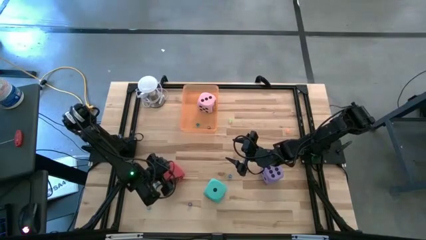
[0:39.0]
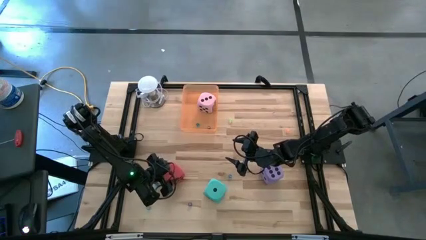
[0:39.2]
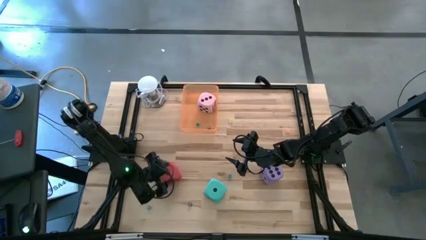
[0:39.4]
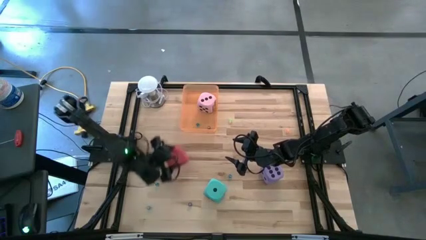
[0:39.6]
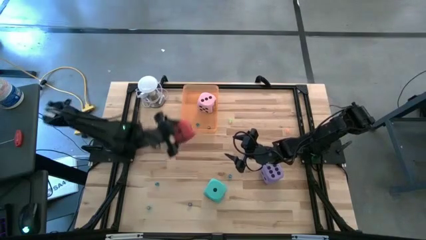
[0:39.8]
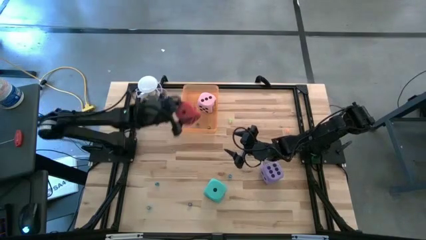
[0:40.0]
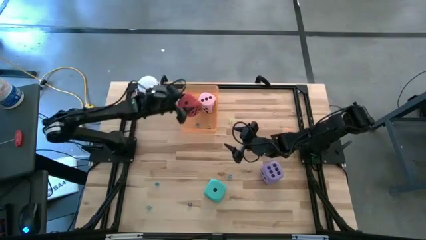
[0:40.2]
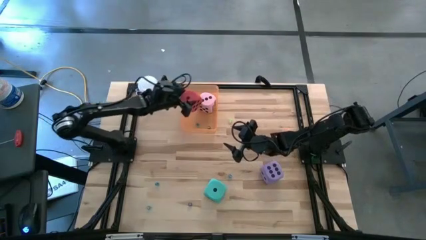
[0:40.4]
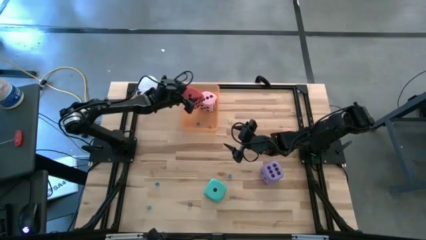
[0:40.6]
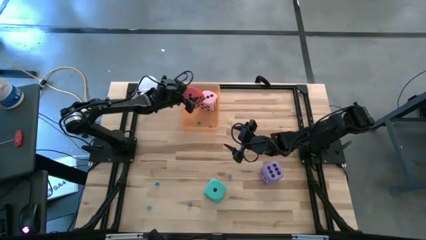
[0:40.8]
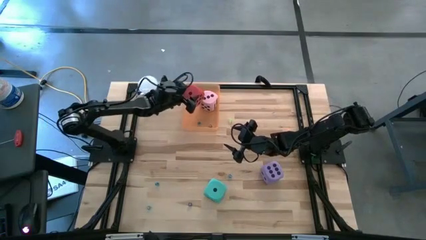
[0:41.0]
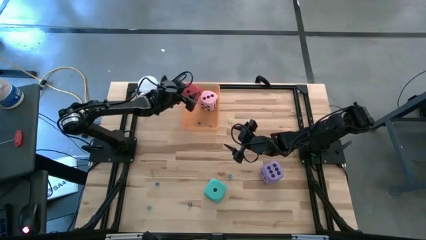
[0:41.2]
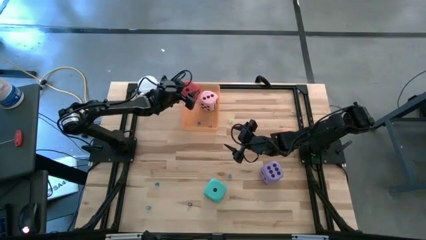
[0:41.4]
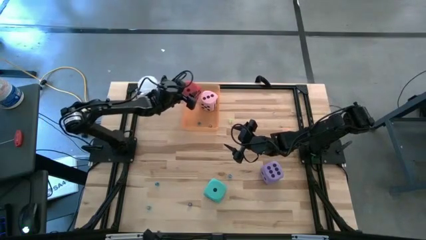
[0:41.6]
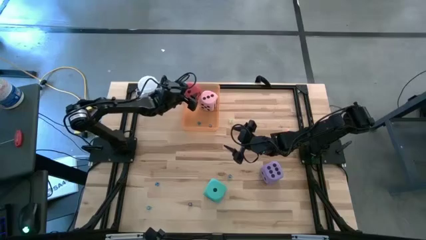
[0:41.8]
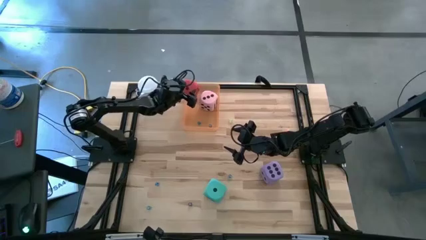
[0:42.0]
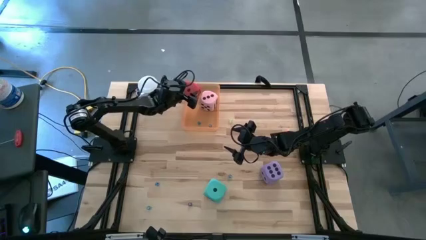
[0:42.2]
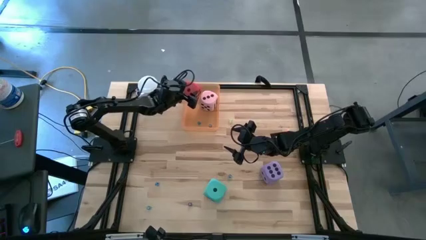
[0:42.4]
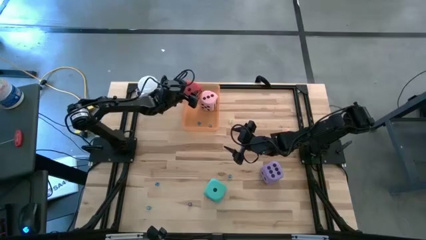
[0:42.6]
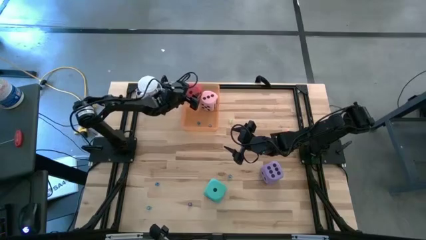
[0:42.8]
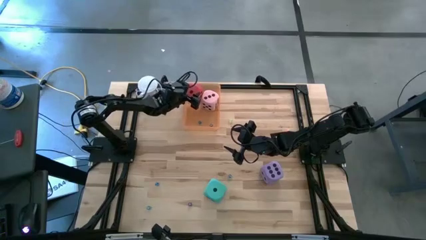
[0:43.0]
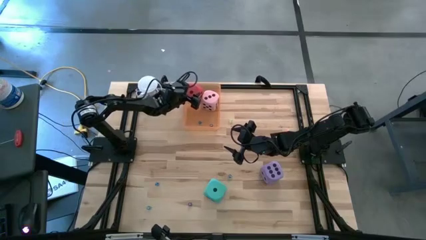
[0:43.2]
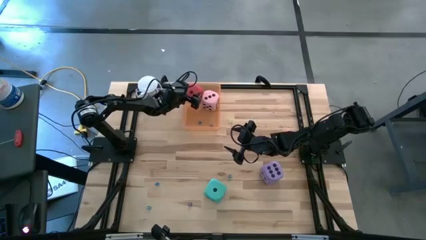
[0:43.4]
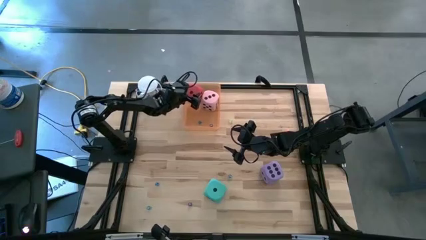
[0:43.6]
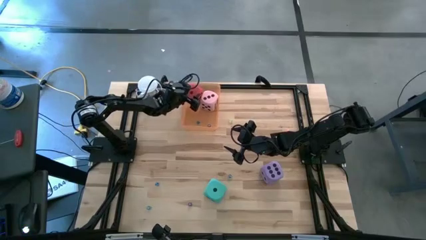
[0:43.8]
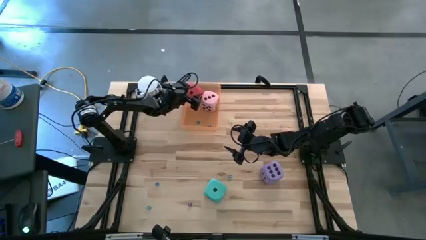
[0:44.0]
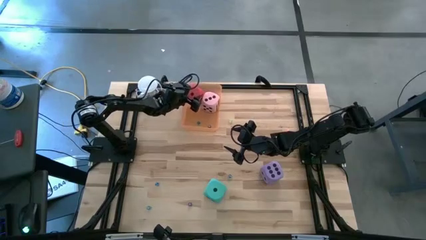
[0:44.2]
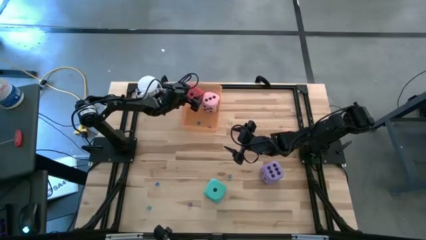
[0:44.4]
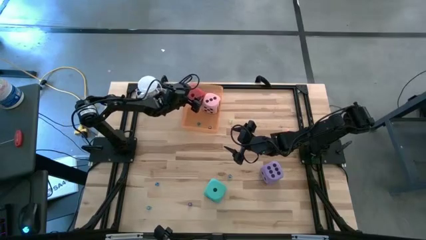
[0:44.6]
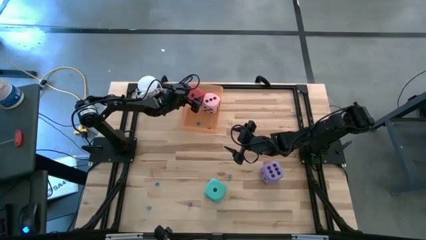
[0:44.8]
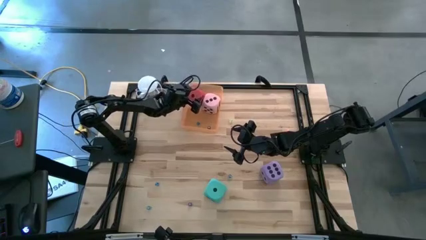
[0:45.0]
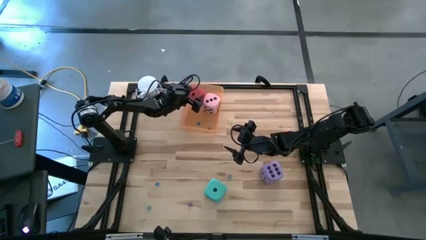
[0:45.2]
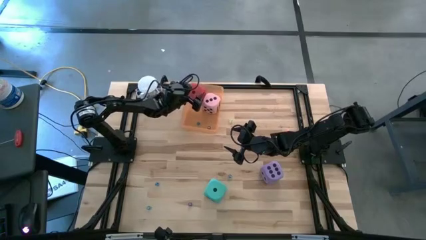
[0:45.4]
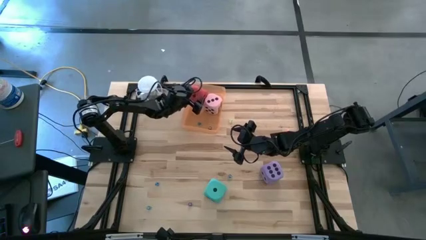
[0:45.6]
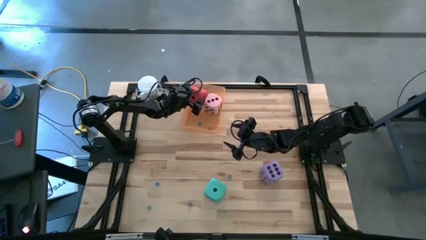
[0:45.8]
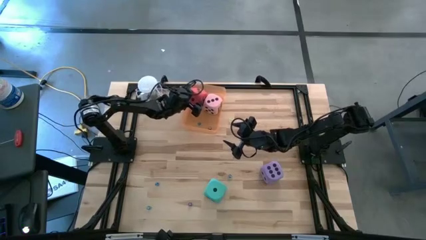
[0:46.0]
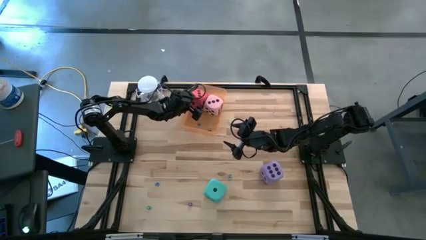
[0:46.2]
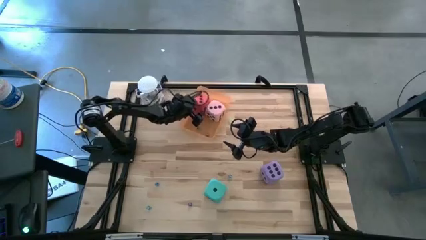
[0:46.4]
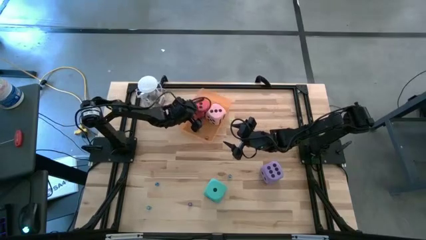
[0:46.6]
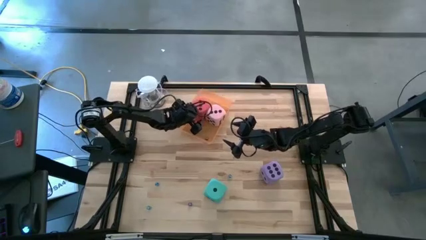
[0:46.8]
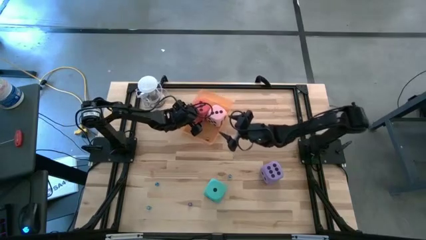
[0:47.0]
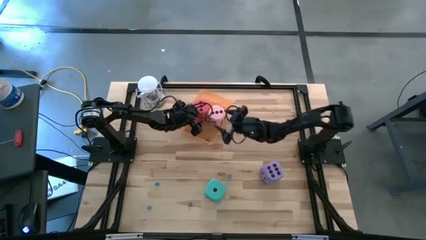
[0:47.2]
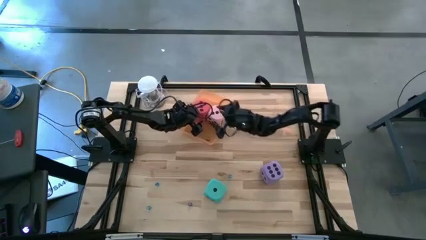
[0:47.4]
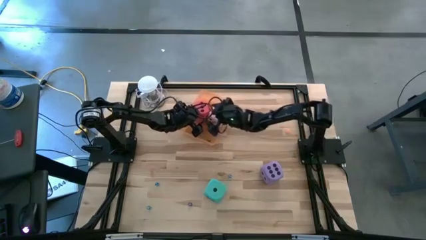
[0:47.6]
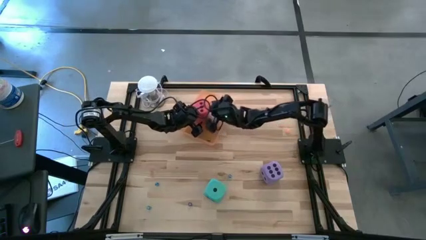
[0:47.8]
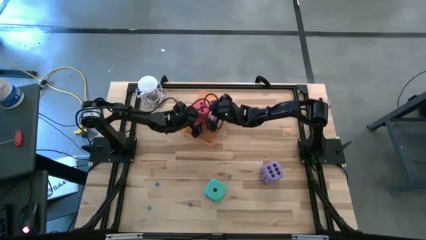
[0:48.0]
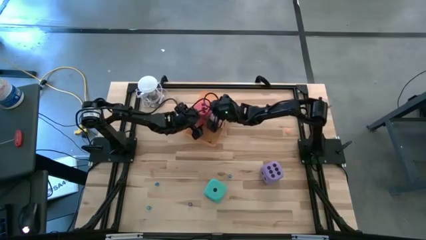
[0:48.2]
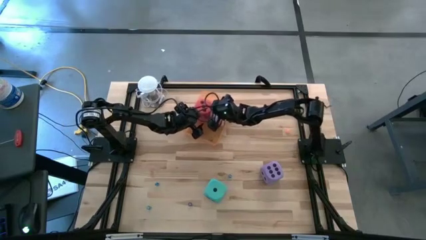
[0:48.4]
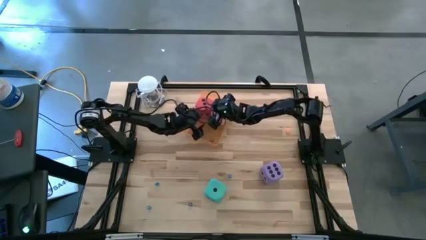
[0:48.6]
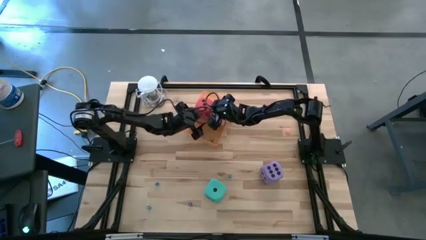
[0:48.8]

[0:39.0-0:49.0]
Task: Pick & Place Dice
Put the big red die into the orange bin

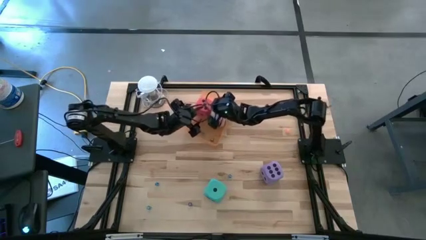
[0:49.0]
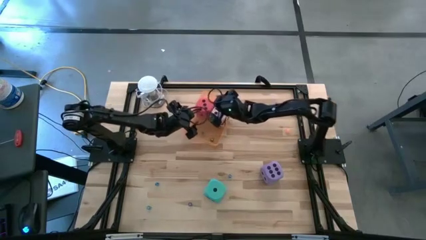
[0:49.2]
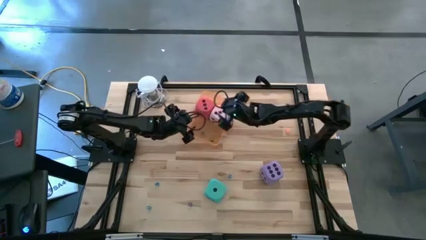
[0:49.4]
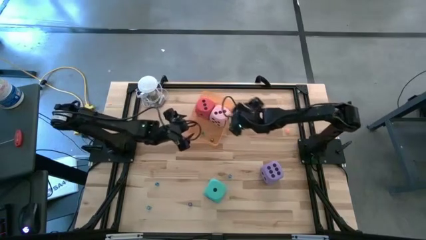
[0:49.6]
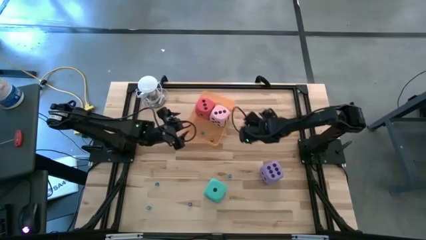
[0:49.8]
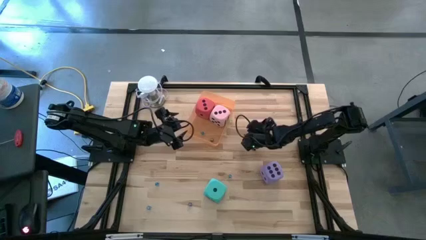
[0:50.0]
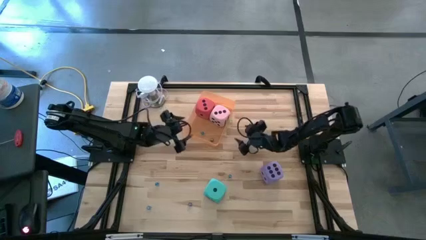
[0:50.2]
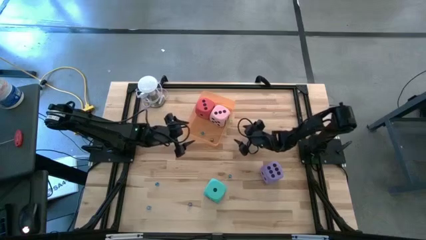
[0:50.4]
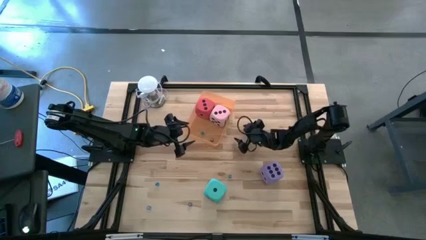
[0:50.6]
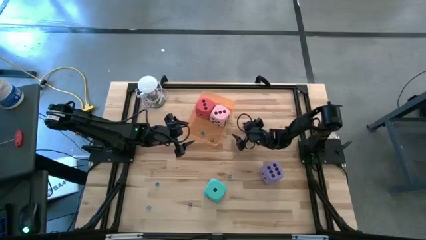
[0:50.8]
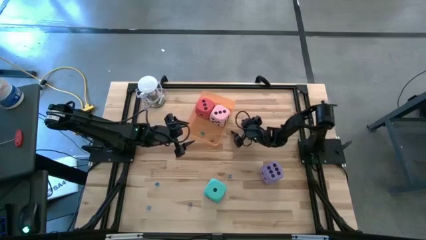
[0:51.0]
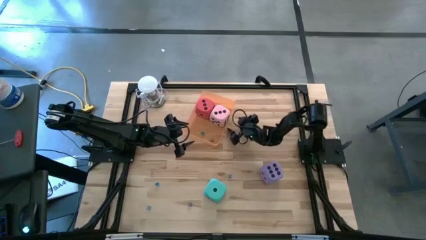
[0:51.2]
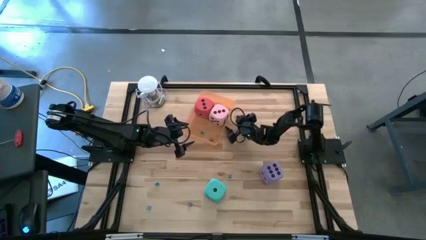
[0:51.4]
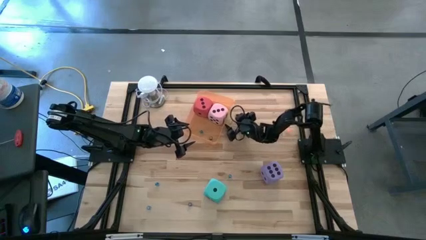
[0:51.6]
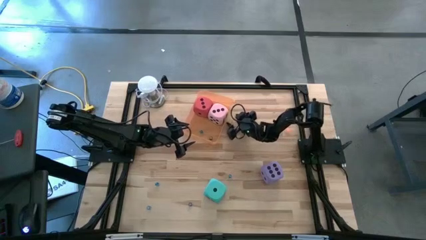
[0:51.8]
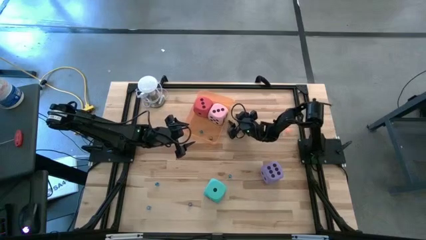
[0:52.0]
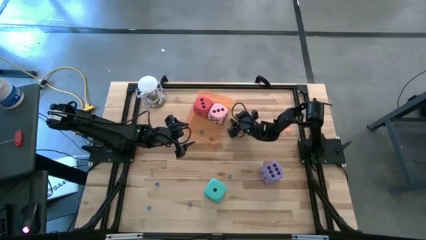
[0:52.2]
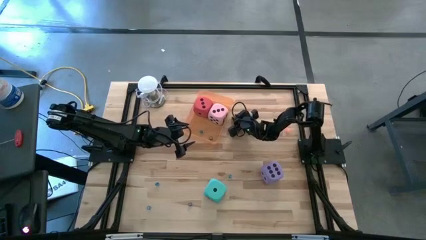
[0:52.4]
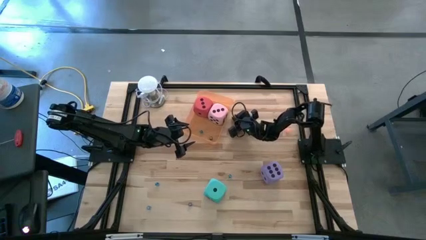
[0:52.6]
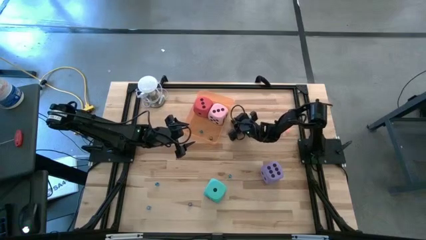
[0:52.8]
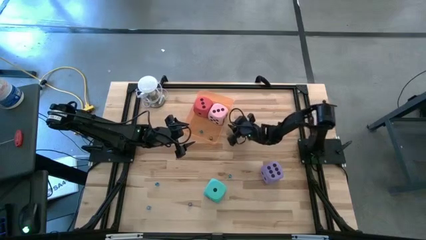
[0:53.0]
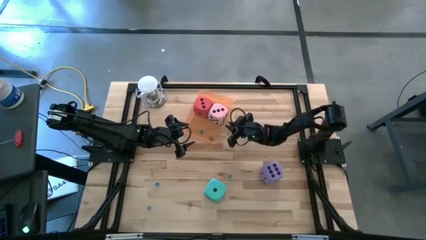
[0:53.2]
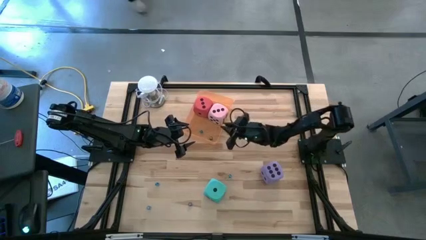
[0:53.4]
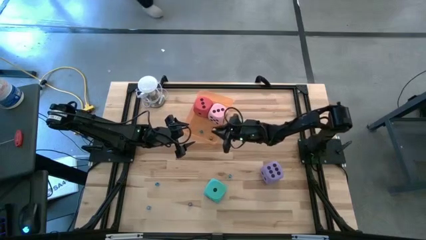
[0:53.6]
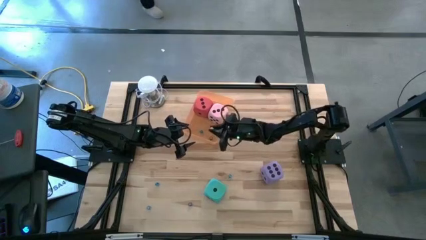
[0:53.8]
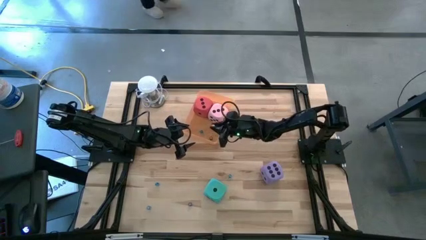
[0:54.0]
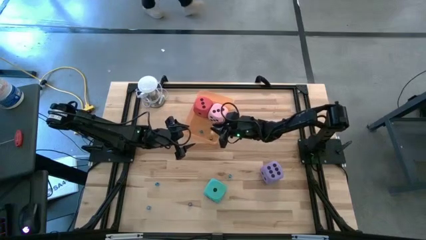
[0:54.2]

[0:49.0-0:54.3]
Put the small green die into the orange bin
